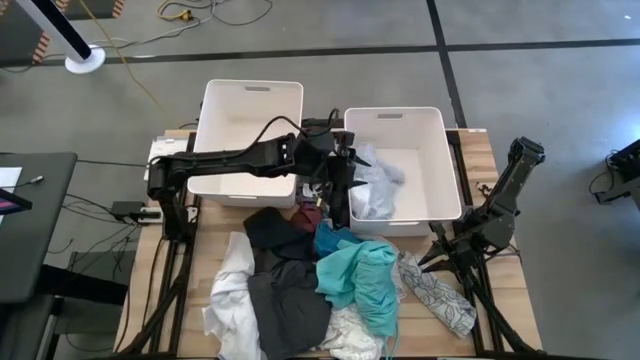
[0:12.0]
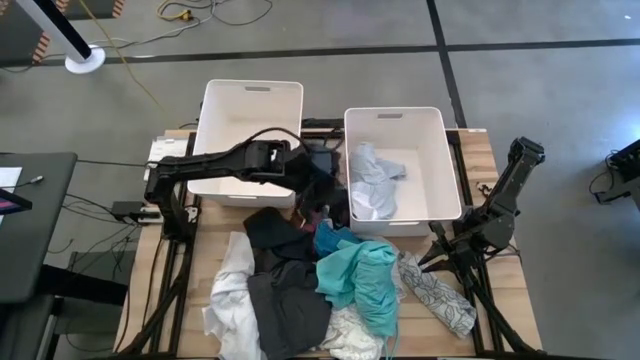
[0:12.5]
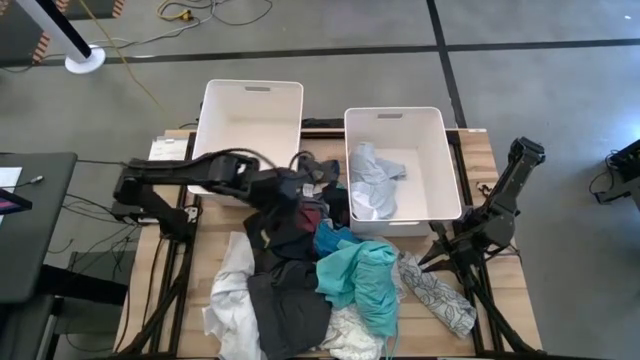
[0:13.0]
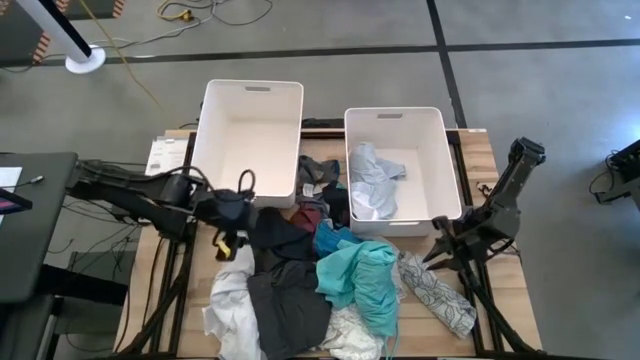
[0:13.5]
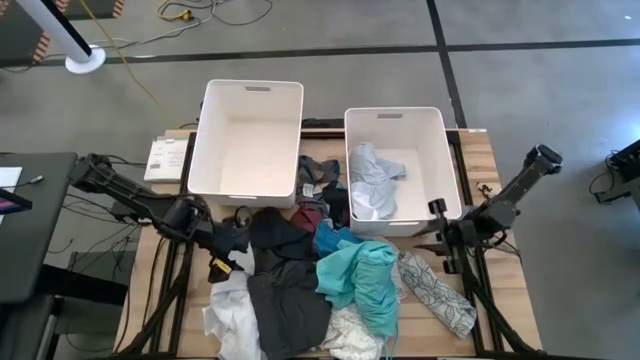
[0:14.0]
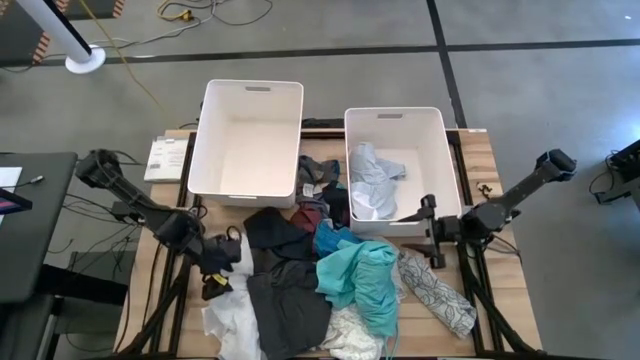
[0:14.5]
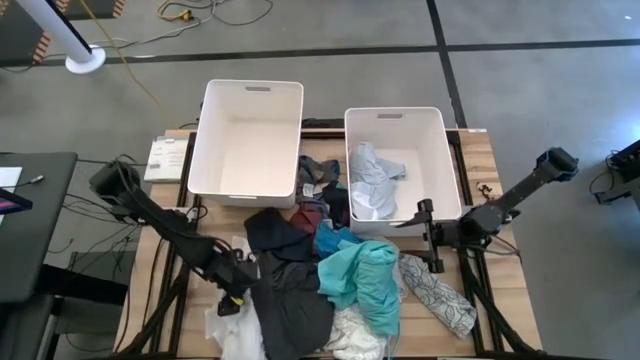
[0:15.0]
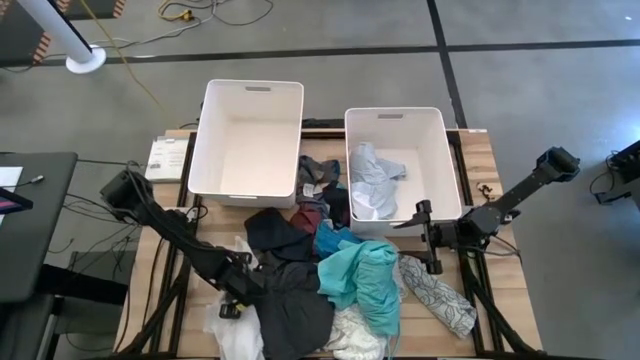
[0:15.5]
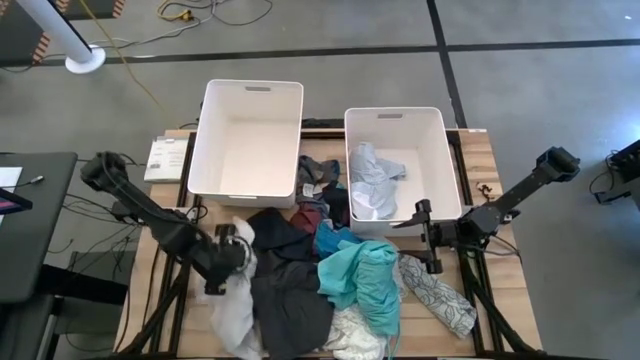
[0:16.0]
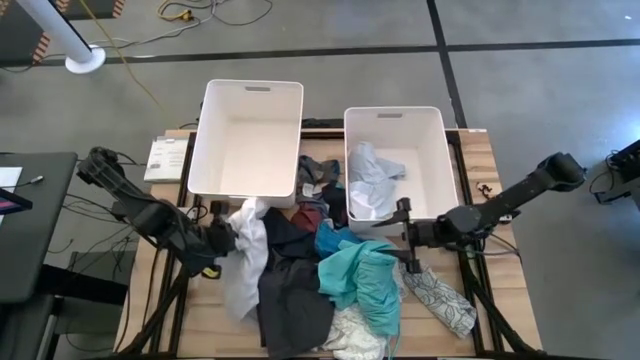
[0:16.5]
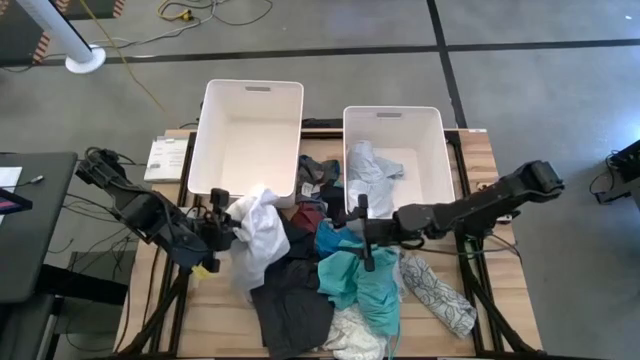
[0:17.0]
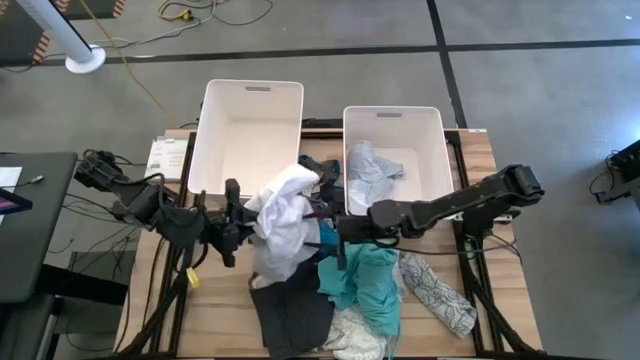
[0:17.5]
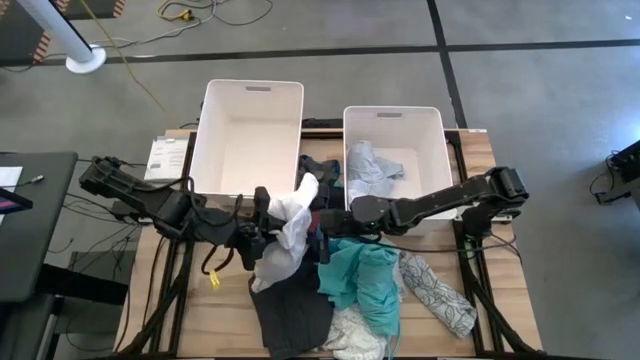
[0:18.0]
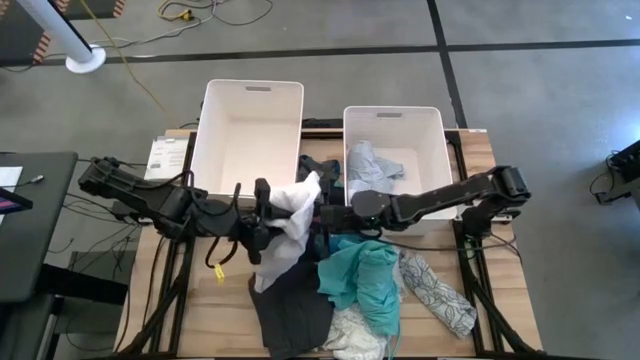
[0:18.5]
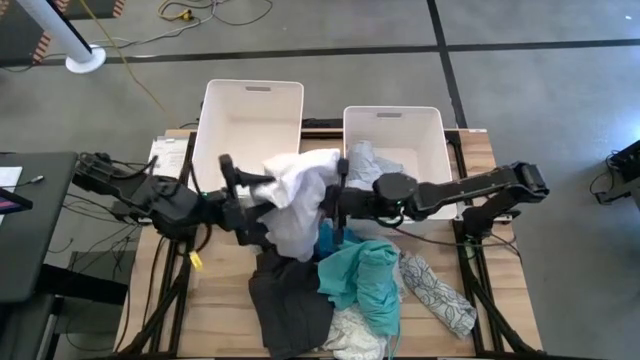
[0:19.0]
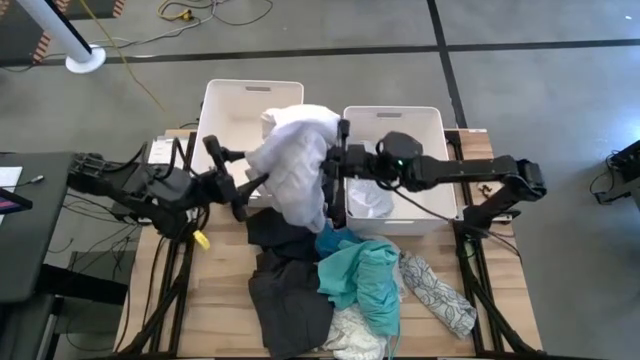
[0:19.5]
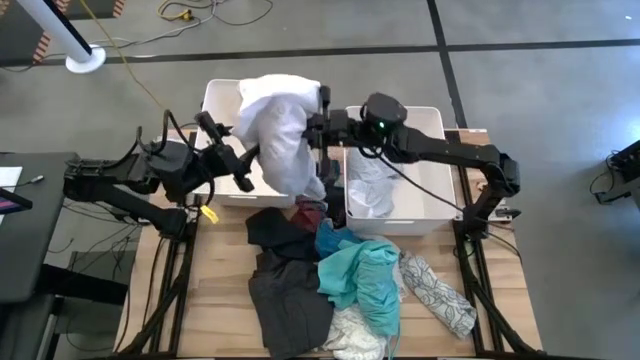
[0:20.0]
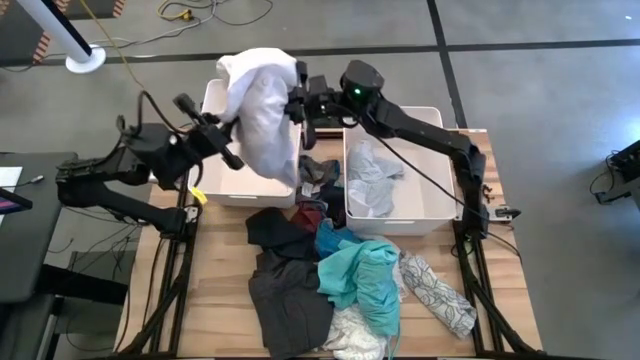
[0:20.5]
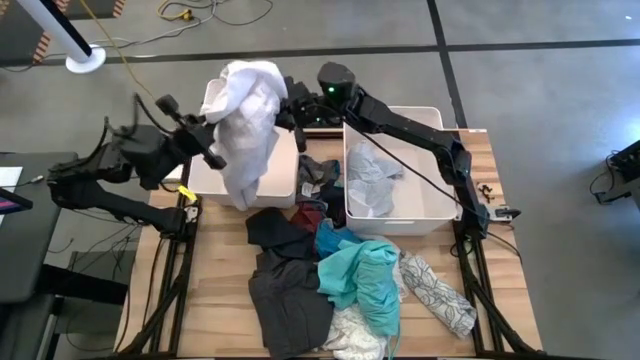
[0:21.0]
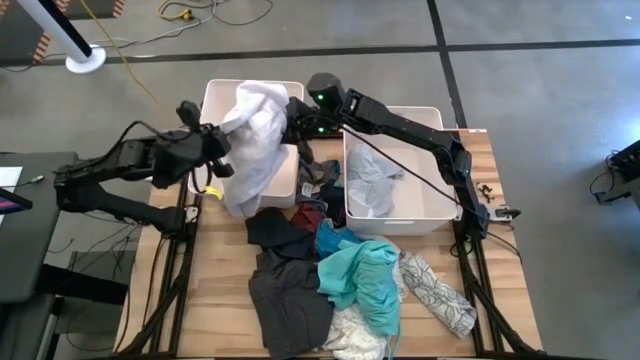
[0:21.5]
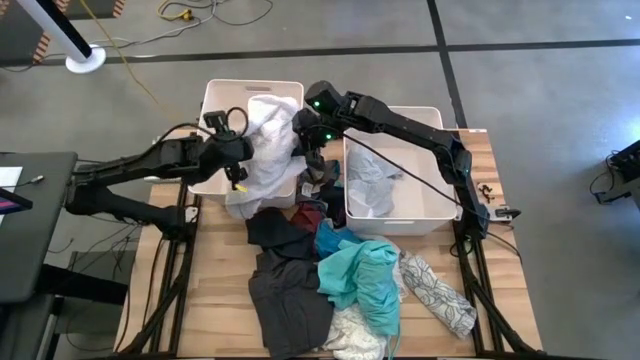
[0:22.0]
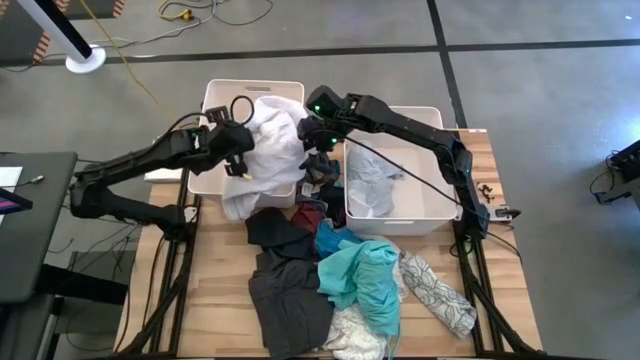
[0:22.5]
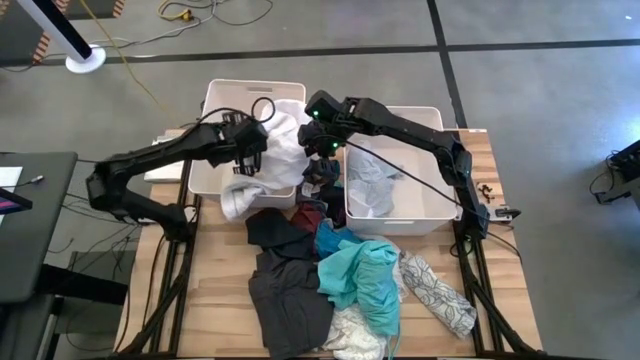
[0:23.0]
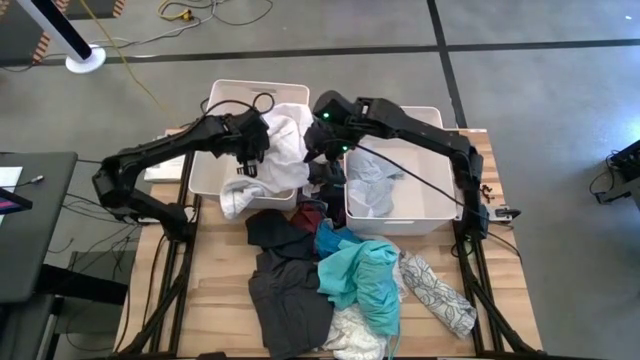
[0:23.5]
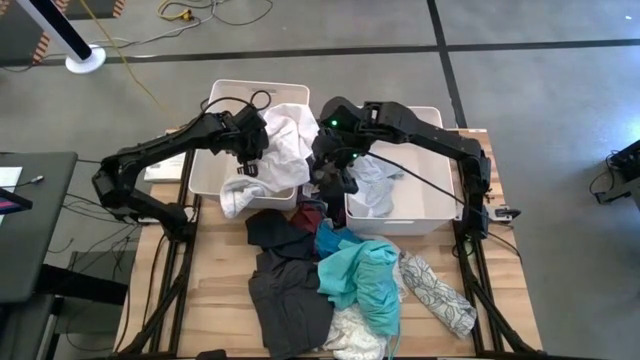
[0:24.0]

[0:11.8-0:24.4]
Task: Sort clothes
Put the white shirt into the left white laundry bin

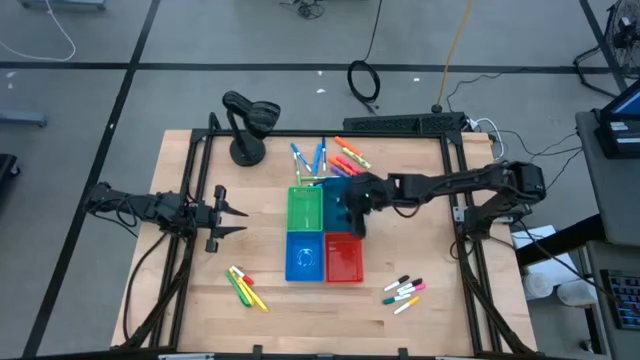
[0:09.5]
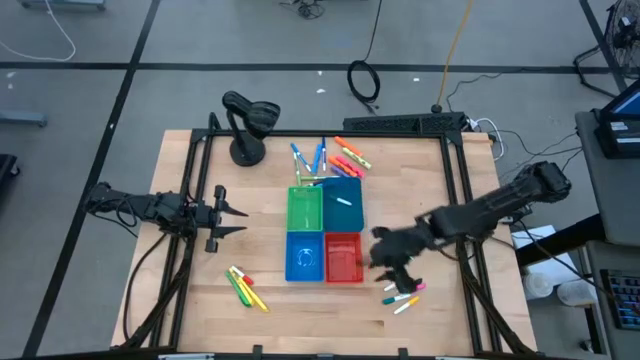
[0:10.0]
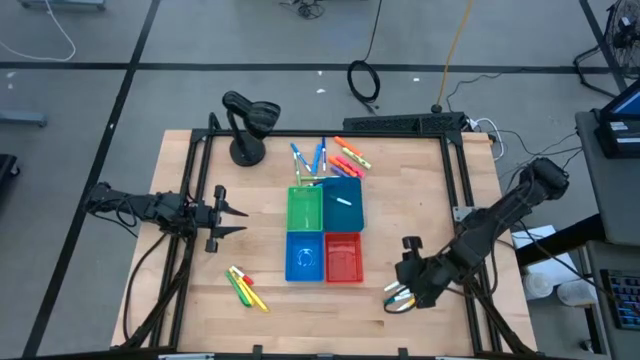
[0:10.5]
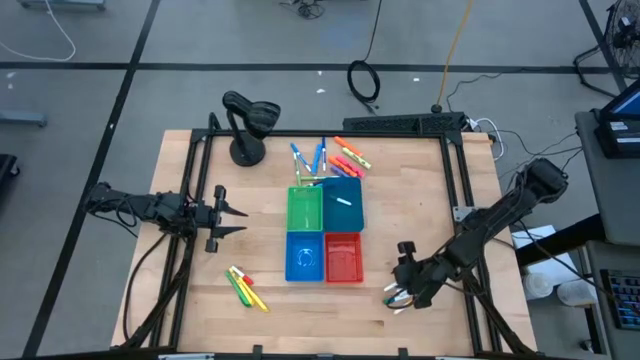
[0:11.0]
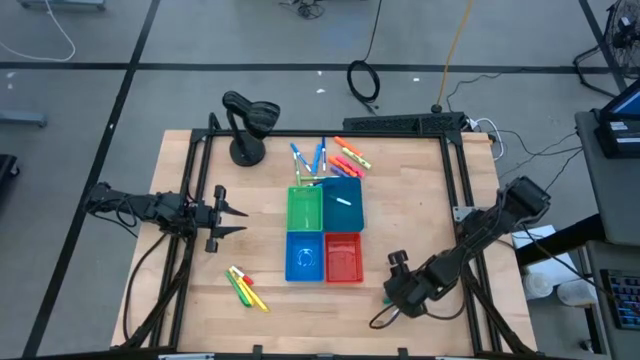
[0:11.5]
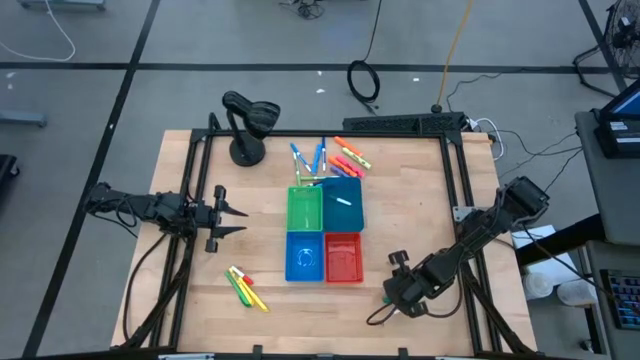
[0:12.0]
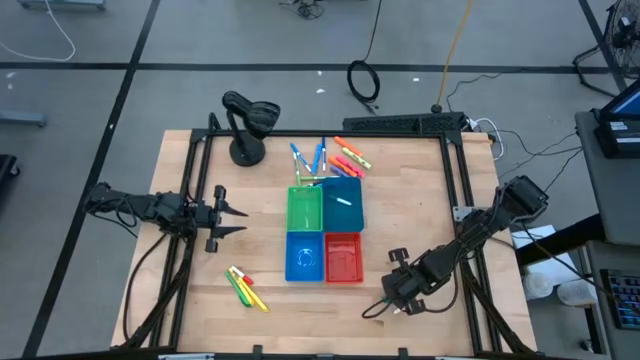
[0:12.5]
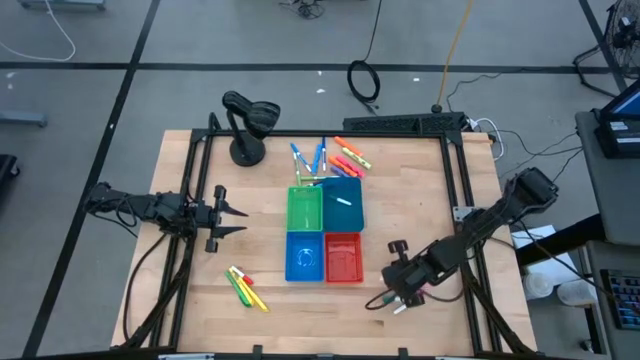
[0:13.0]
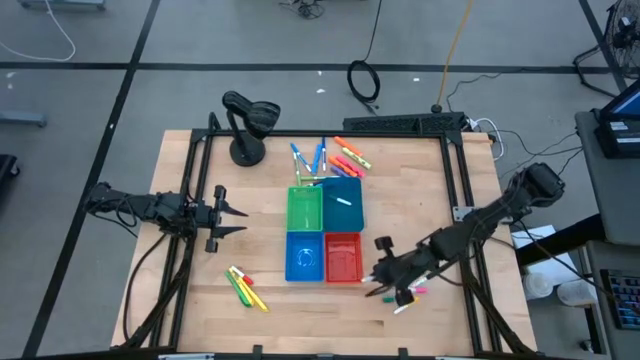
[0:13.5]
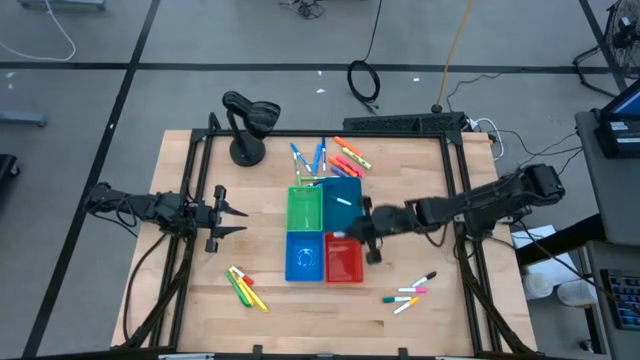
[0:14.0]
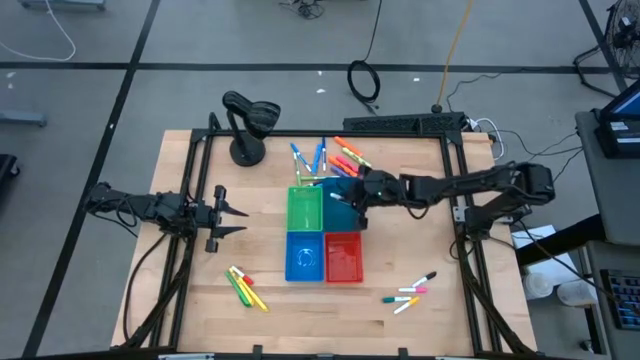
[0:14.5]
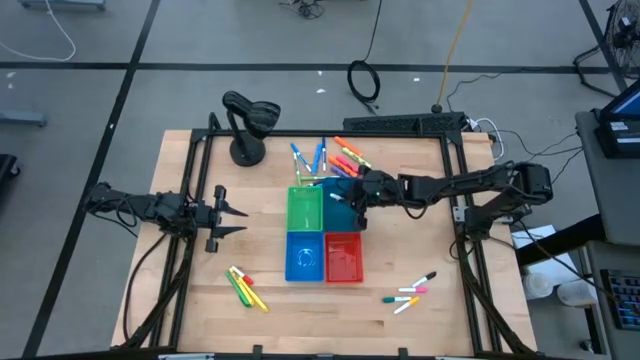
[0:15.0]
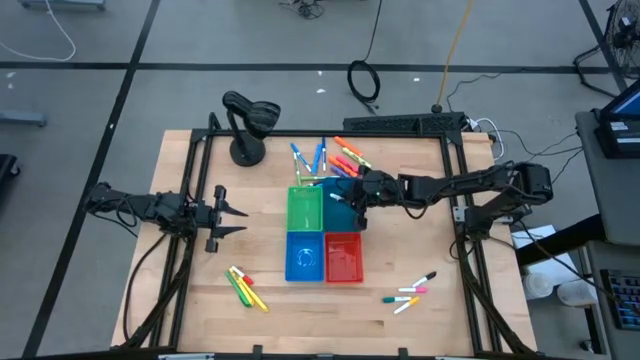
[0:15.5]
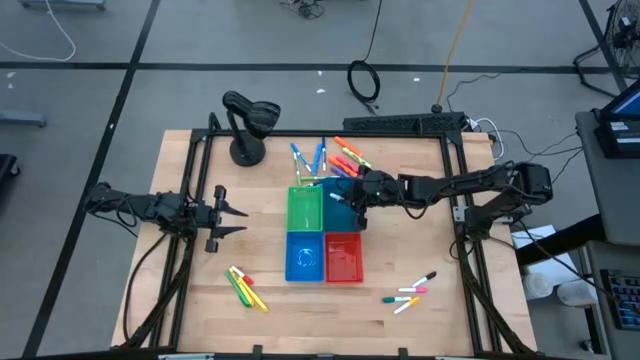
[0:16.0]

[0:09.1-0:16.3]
Task: Pick & Place Markers
Put the black highlighter pen into the blue bin
